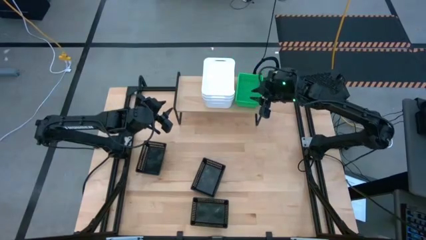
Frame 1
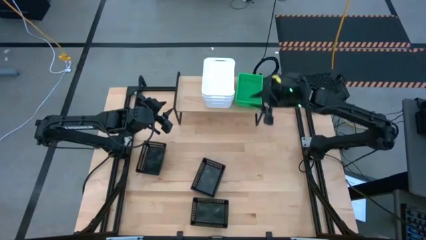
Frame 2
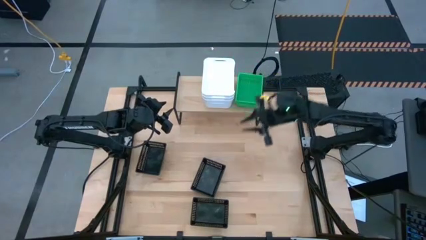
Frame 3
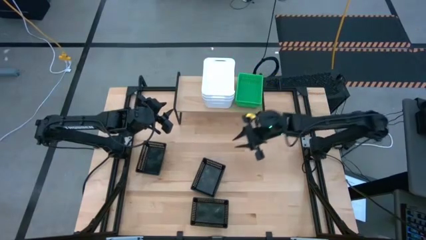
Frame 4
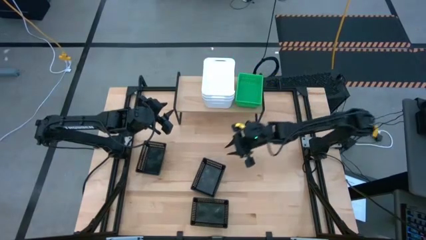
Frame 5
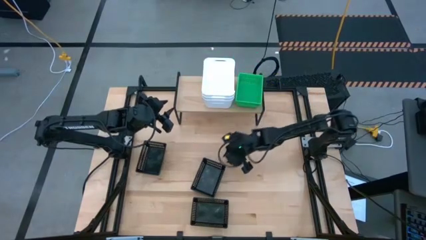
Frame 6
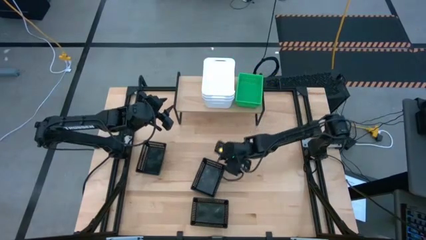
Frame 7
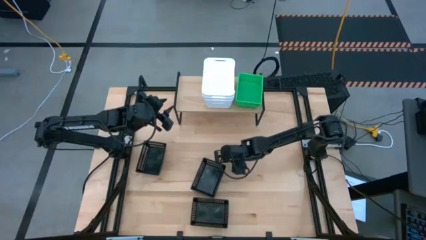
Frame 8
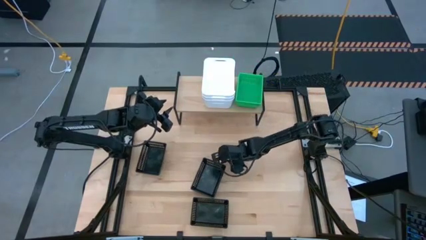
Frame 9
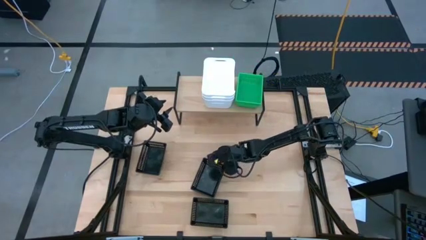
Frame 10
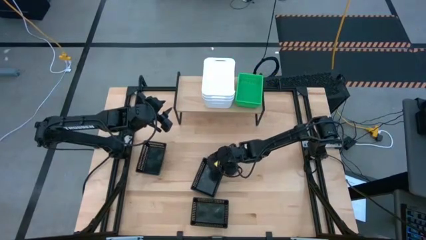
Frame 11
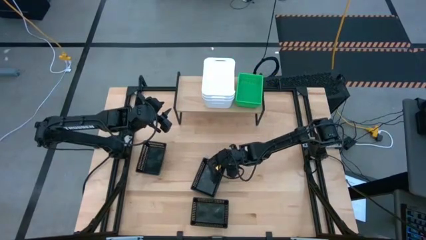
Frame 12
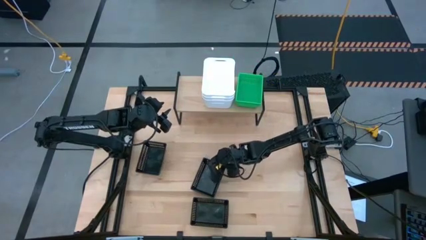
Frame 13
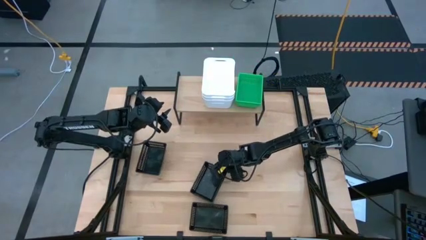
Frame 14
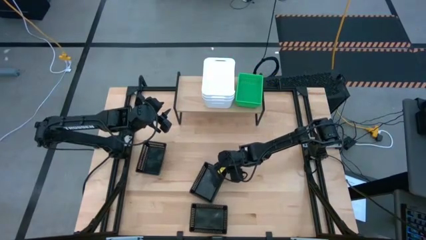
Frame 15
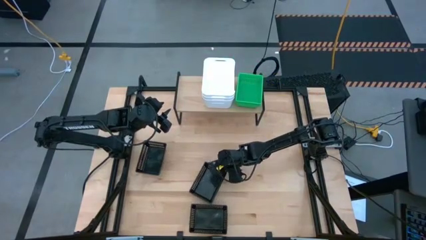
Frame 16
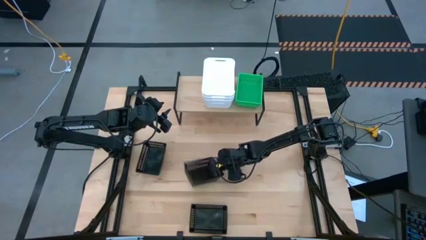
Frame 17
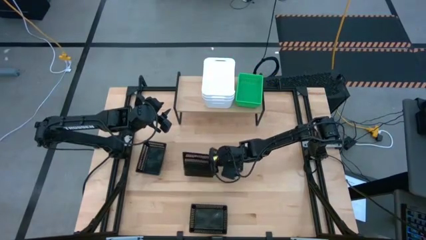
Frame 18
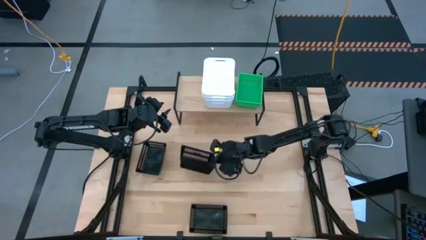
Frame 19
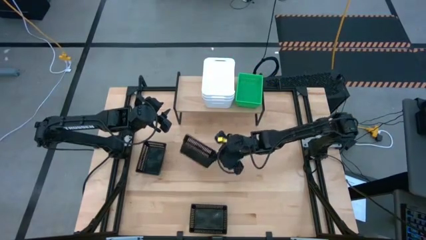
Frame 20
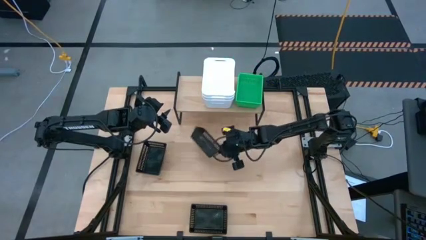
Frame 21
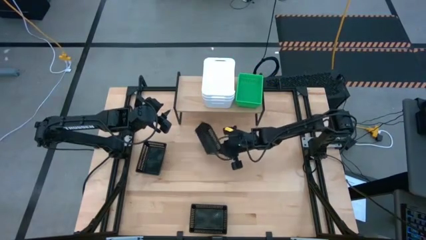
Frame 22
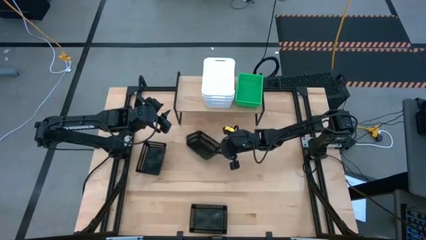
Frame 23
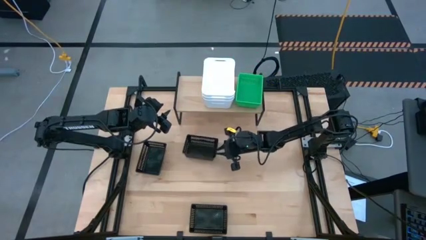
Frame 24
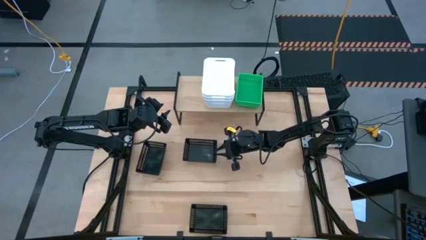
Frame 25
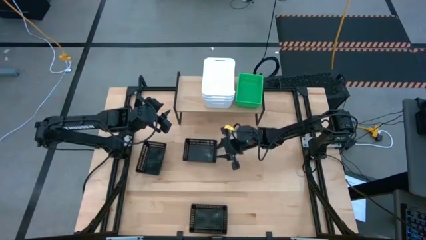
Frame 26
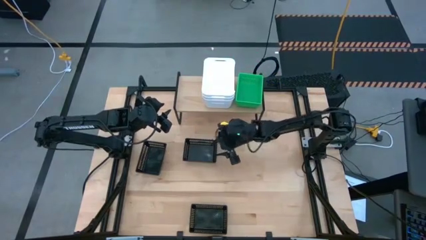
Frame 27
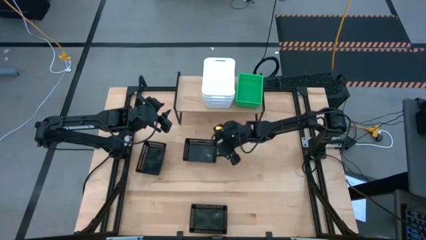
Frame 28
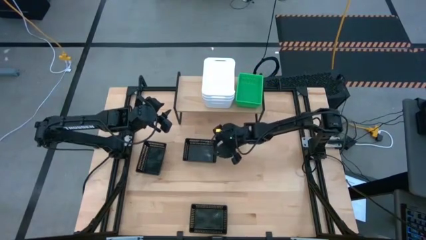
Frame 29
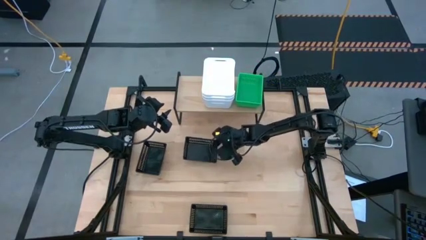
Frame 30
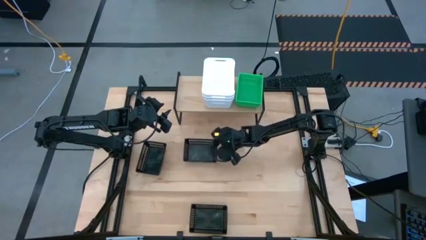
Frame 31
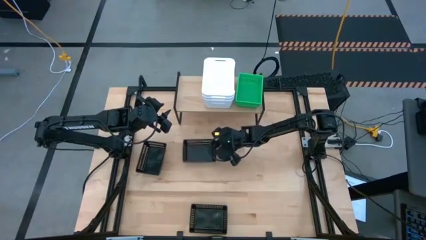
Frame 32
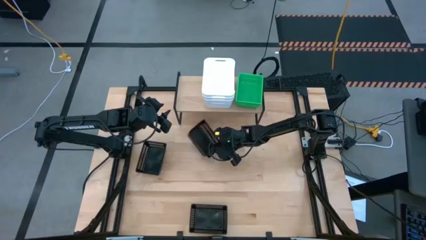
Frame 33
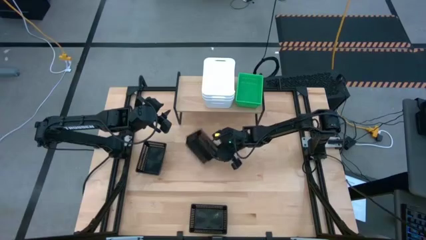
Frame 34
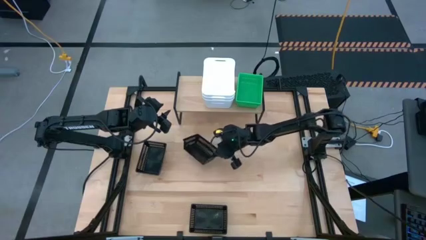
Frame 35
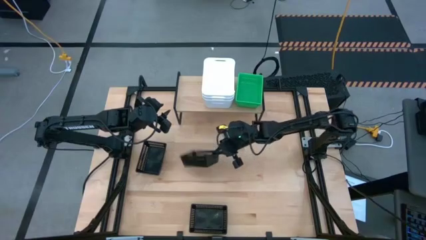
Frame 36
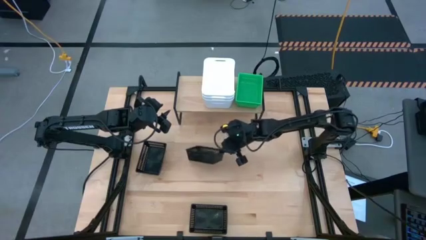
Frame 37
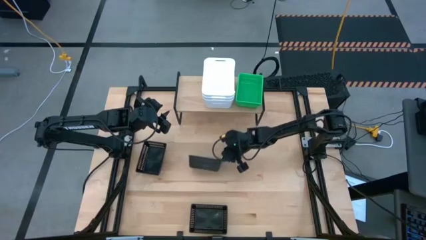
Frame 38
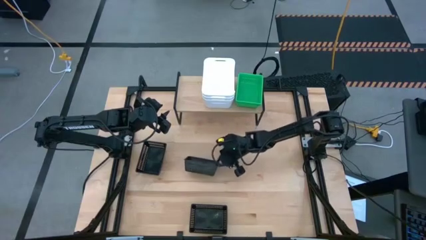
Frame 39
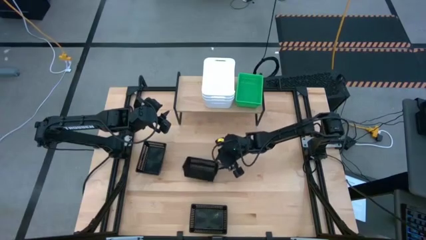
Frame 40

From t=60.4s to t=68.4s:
Task: Stack baskets on shelf by color
Put the top right black bin on the shelf

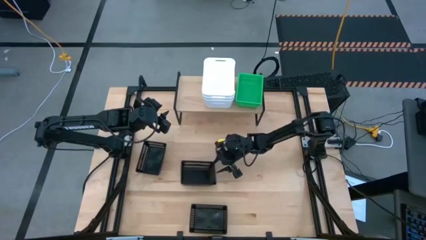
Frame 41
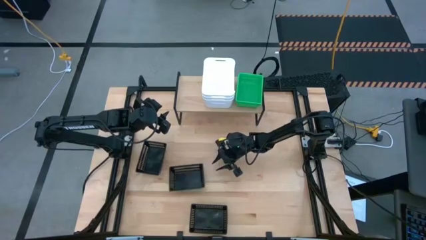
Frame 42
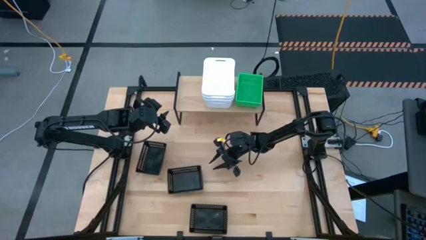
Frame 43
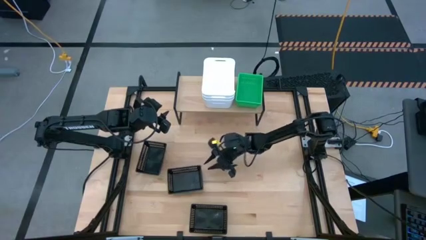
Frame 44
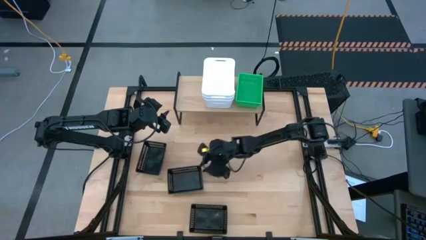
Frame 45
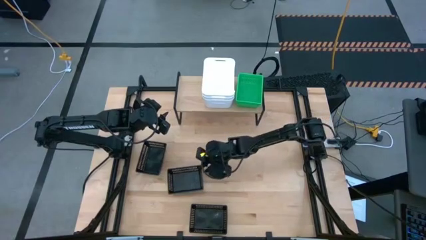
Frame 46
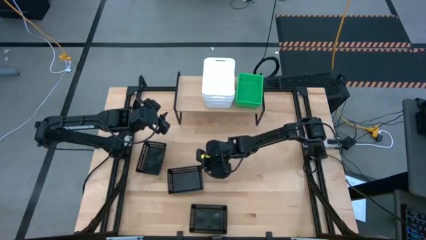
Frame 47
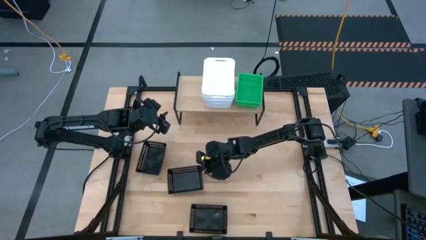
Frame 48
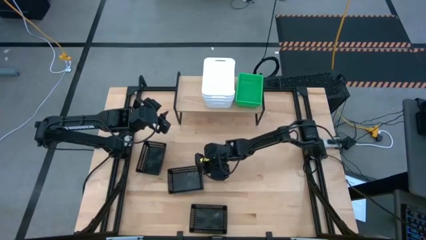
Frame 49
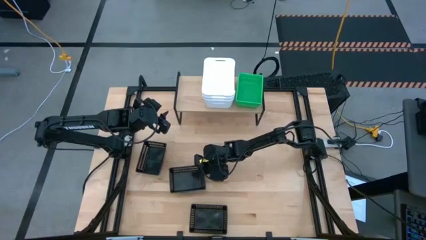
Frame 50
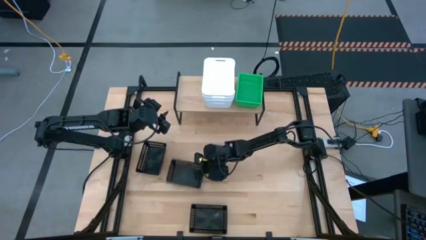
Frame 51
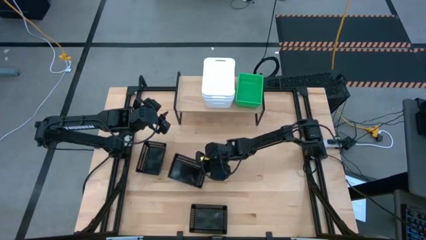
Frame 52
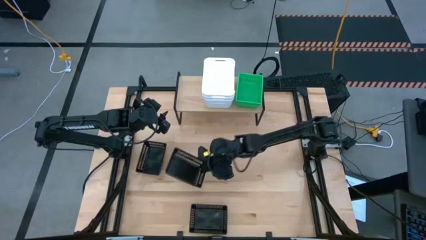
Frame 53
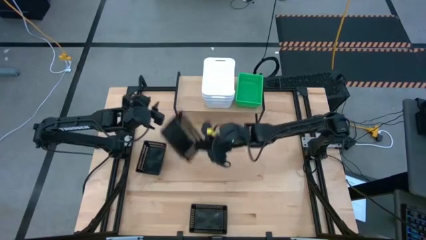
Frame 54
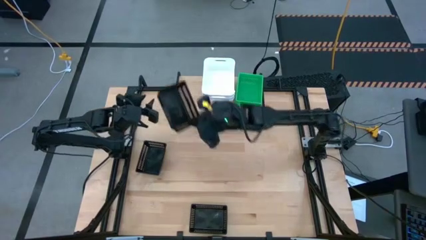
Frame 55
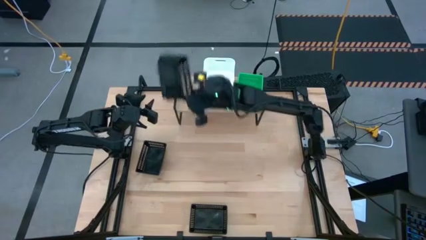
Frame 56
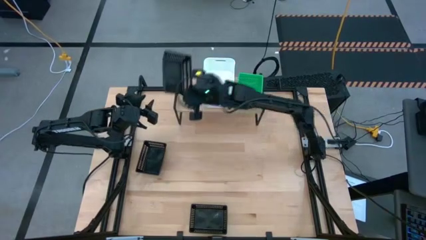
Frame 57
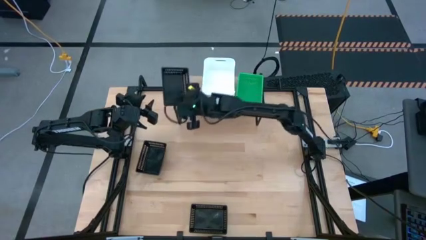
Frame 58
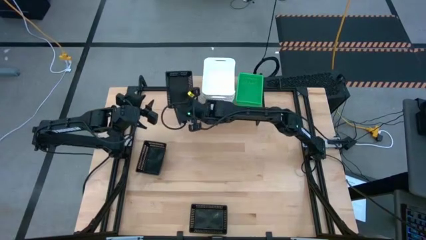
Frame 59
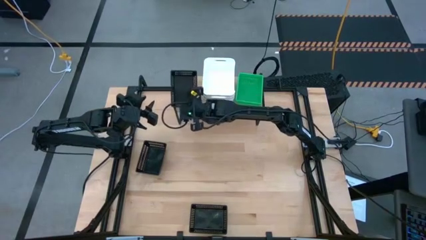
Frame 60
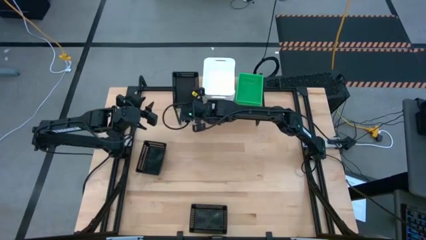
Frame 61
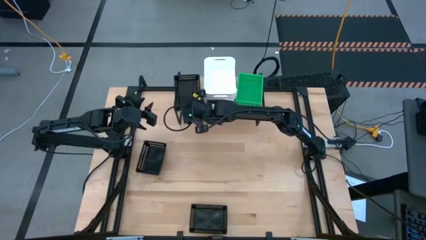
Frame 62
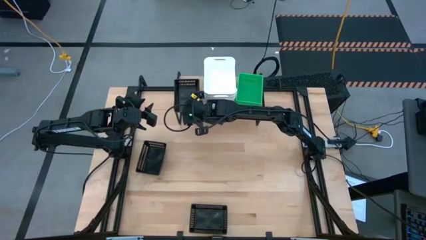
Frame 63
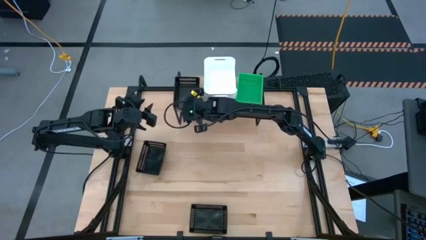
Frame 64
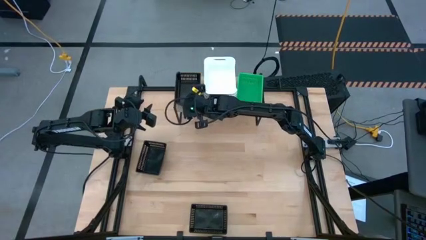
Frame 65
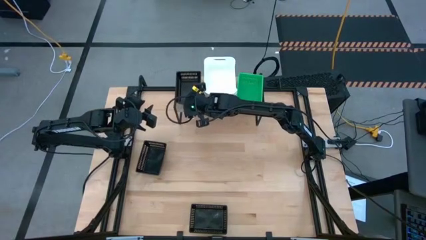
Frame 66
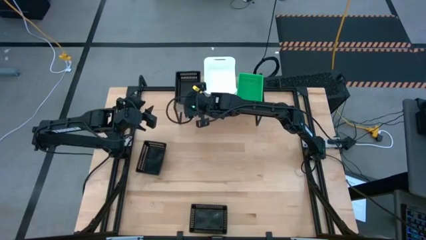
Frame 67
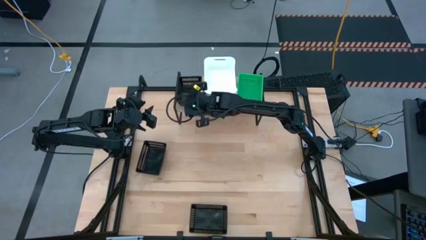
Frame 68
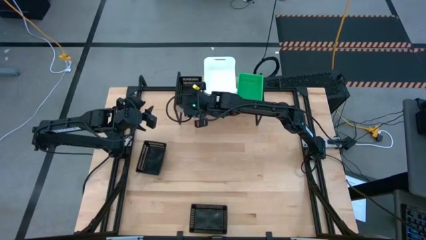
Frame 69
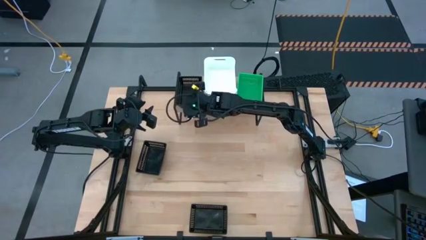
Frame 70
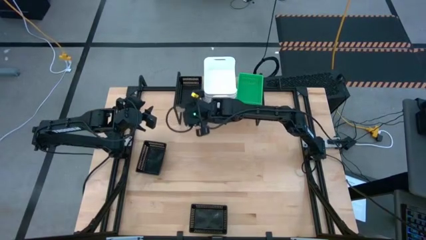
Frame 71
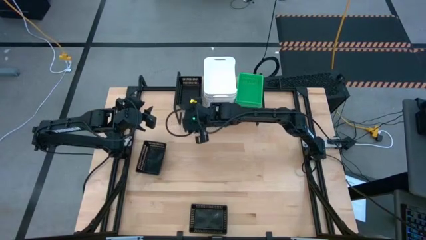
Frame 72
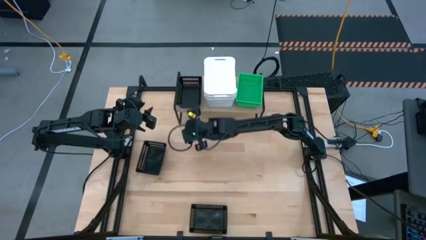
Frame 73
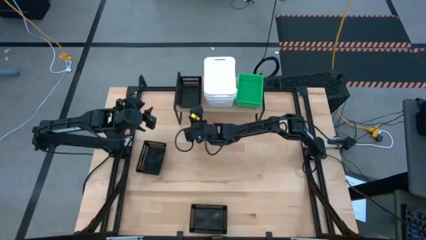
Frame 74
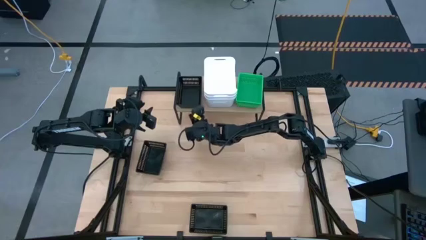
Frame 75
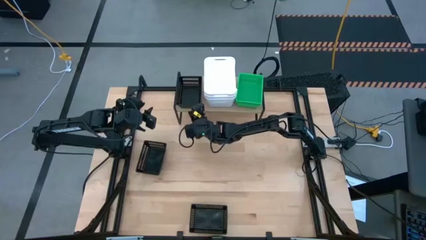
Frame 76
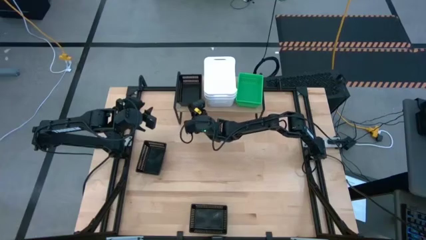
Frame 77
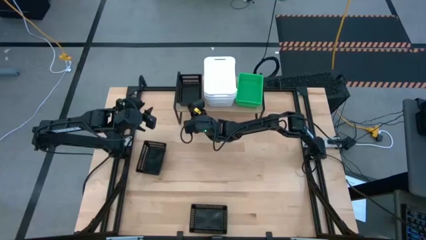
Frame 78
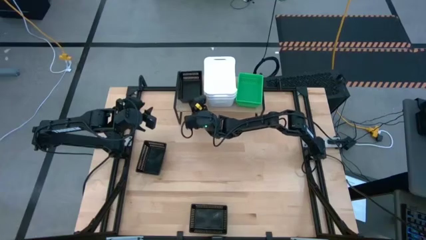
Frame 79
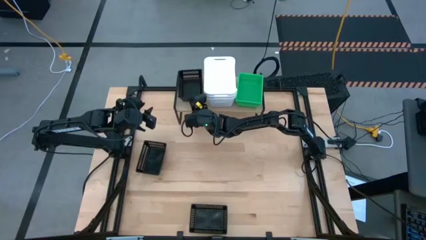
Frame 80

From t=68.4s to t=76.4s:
Put the top right black bin on the shelf
